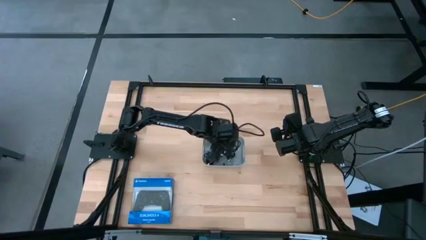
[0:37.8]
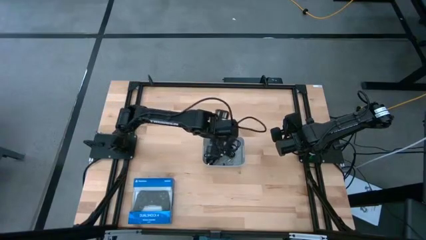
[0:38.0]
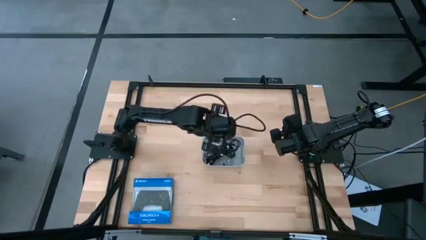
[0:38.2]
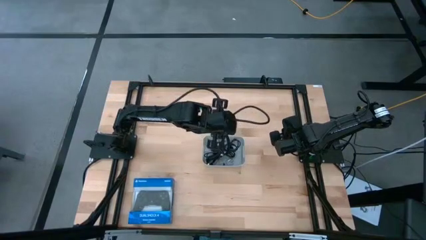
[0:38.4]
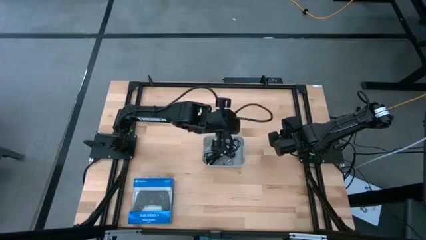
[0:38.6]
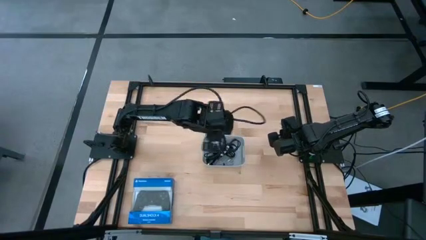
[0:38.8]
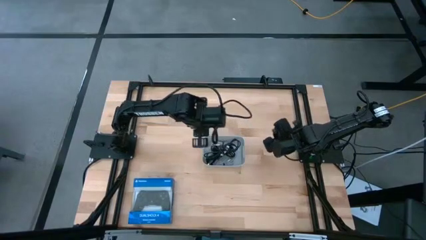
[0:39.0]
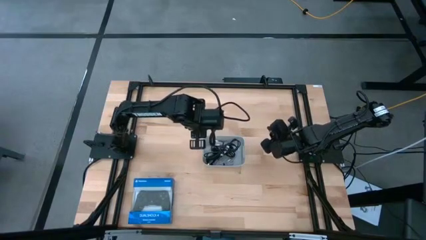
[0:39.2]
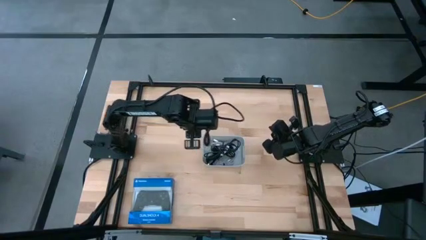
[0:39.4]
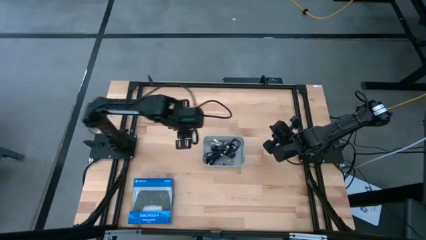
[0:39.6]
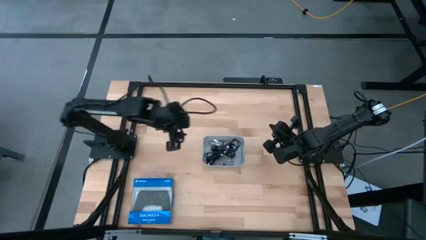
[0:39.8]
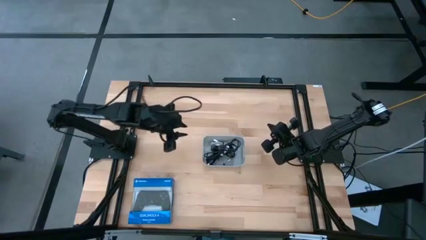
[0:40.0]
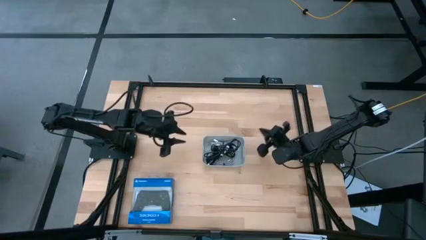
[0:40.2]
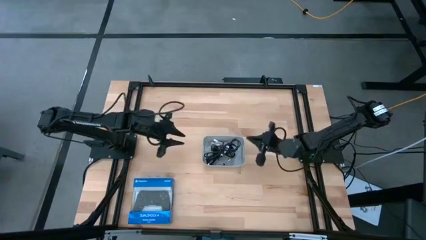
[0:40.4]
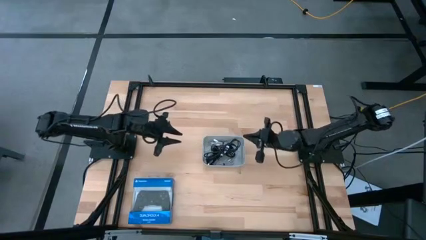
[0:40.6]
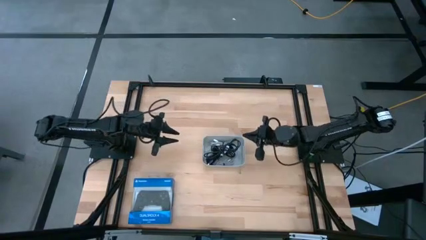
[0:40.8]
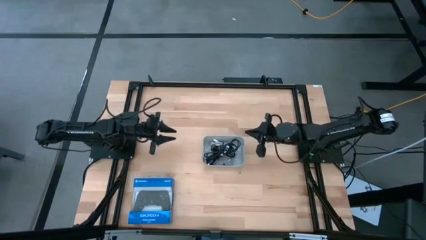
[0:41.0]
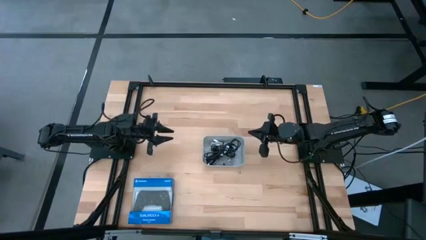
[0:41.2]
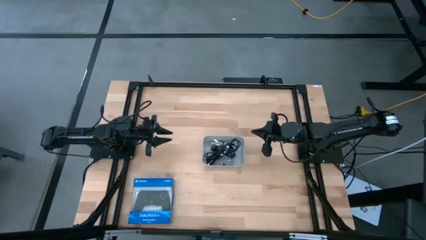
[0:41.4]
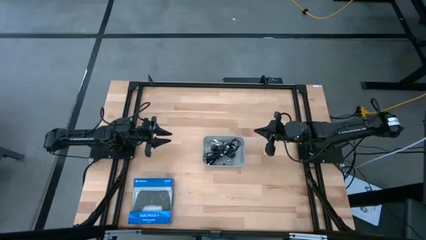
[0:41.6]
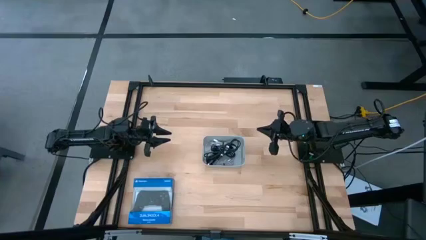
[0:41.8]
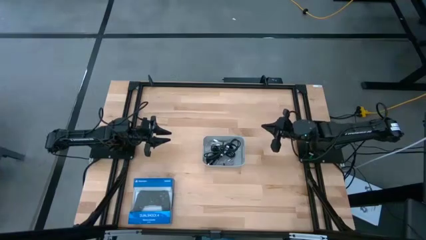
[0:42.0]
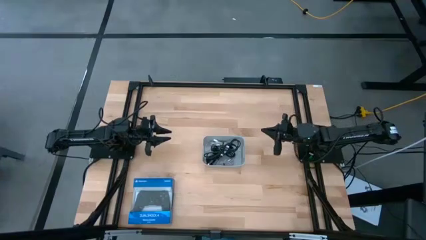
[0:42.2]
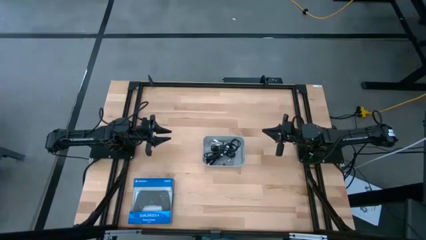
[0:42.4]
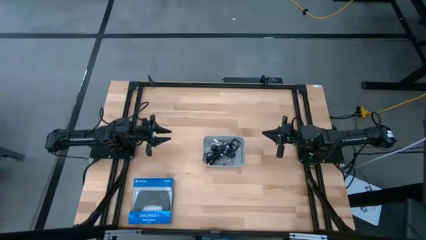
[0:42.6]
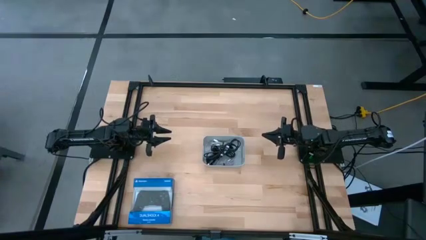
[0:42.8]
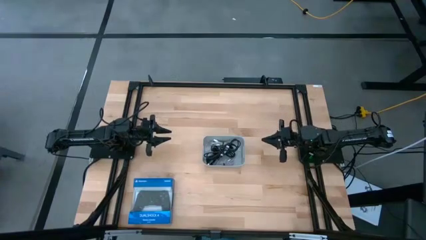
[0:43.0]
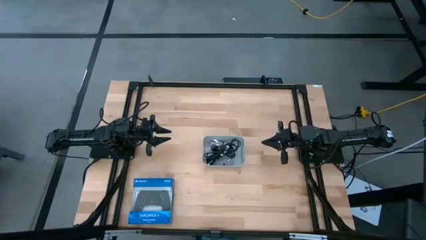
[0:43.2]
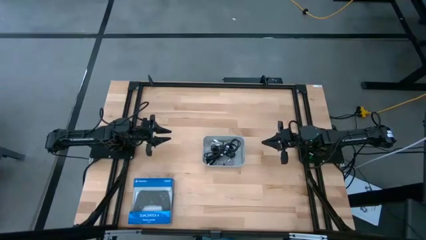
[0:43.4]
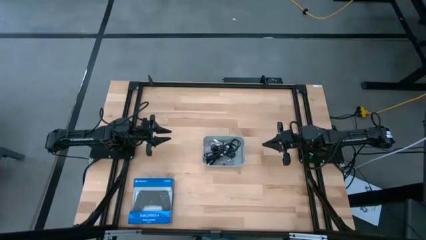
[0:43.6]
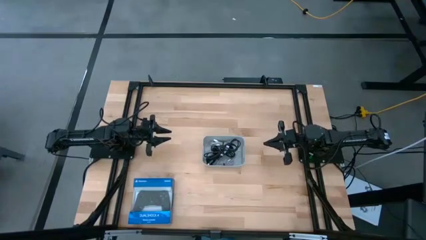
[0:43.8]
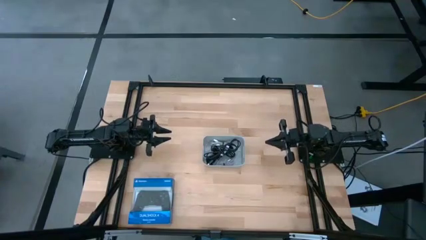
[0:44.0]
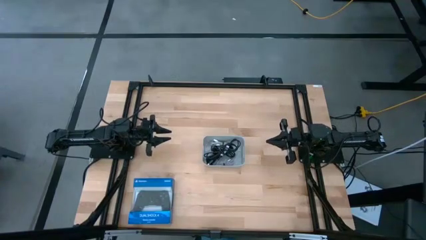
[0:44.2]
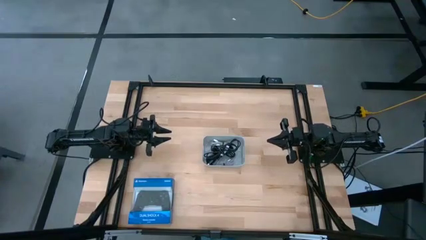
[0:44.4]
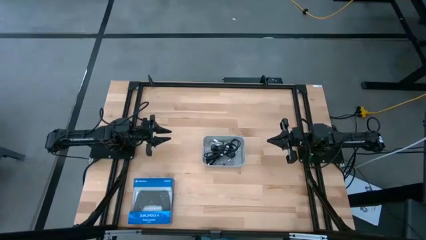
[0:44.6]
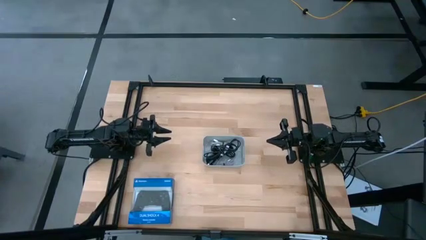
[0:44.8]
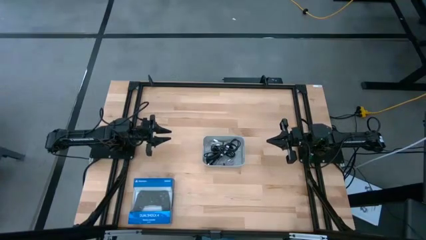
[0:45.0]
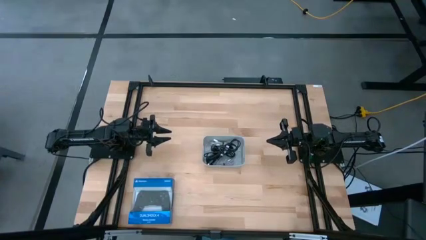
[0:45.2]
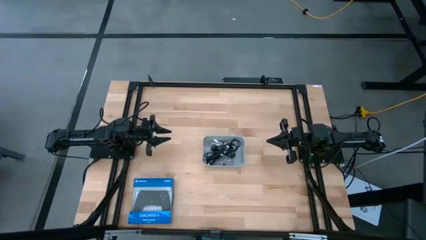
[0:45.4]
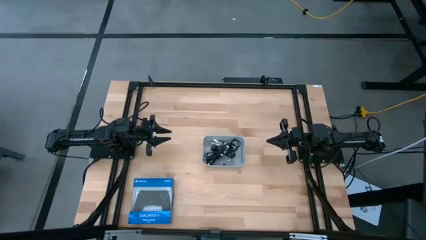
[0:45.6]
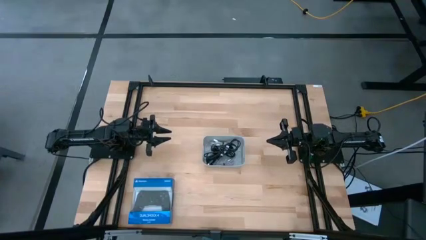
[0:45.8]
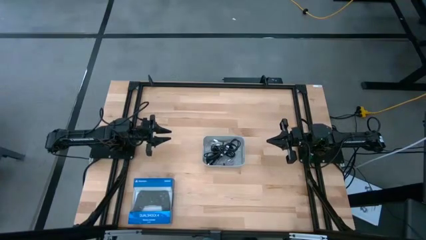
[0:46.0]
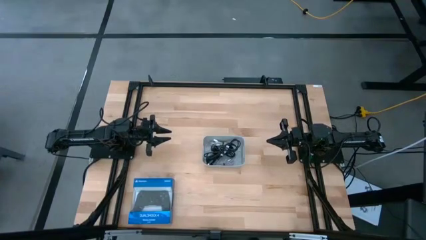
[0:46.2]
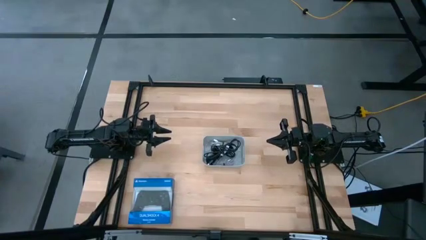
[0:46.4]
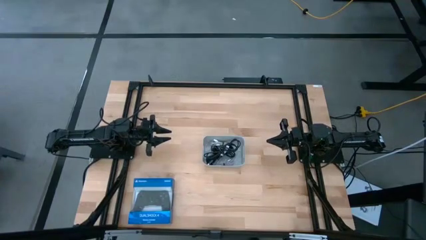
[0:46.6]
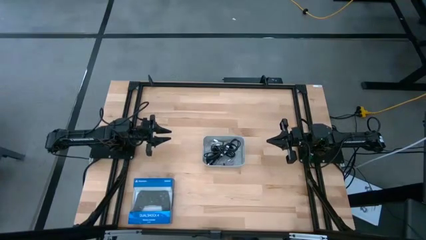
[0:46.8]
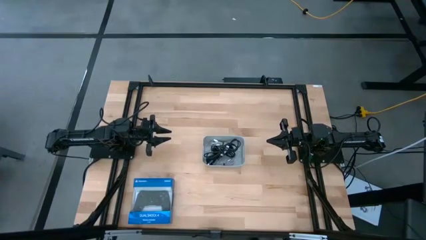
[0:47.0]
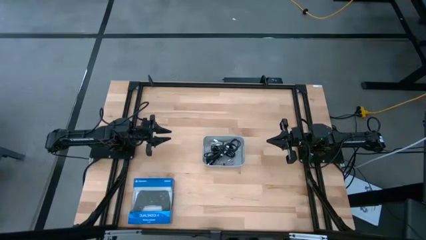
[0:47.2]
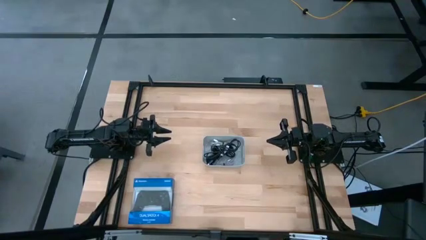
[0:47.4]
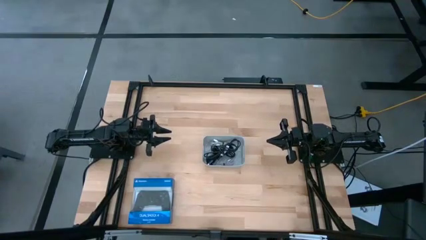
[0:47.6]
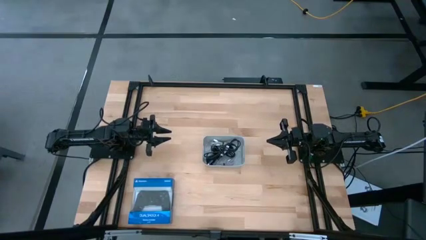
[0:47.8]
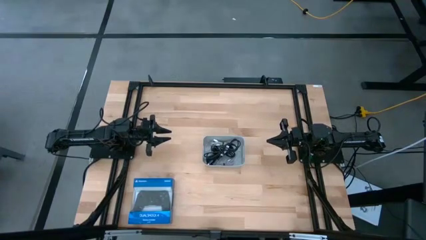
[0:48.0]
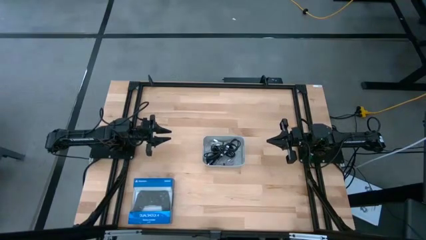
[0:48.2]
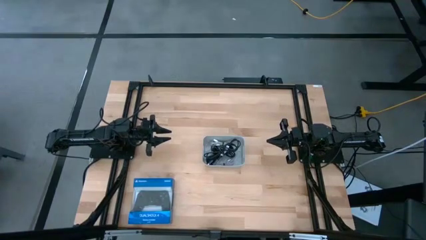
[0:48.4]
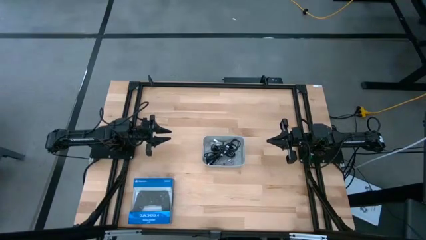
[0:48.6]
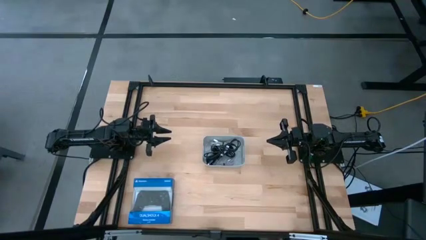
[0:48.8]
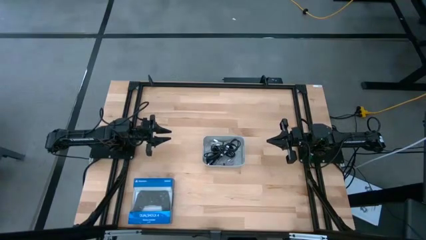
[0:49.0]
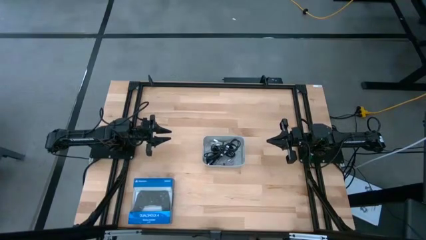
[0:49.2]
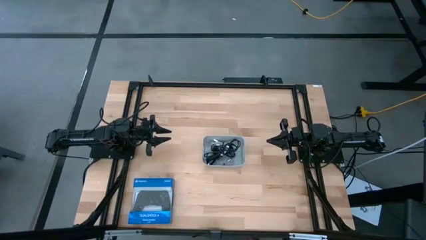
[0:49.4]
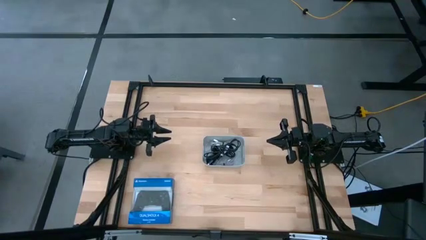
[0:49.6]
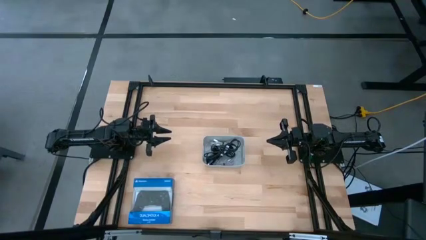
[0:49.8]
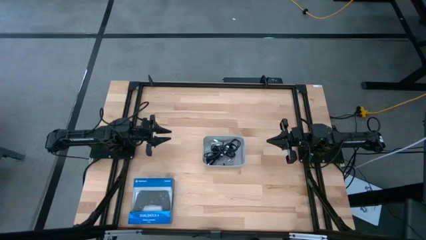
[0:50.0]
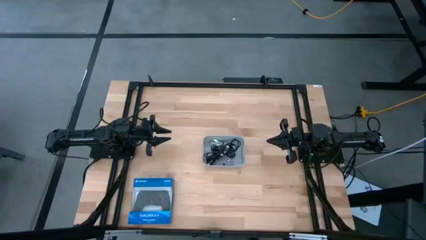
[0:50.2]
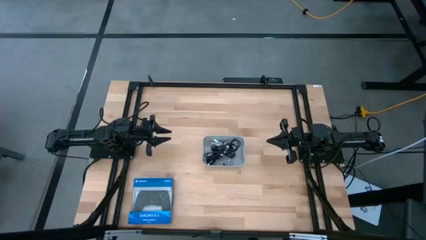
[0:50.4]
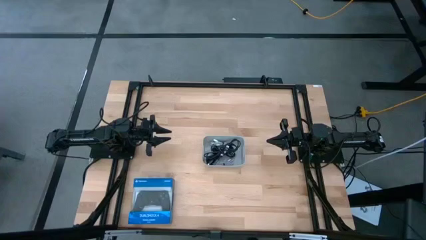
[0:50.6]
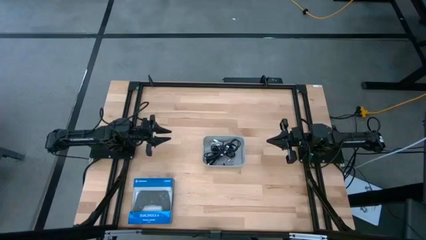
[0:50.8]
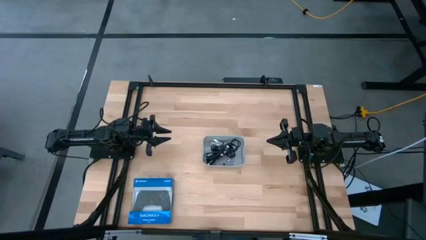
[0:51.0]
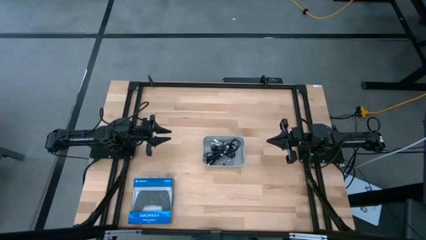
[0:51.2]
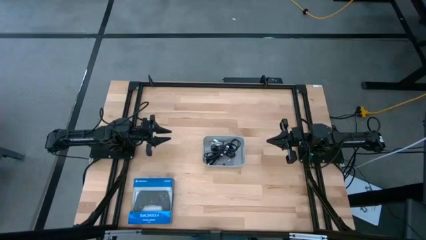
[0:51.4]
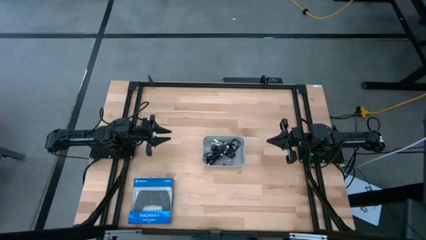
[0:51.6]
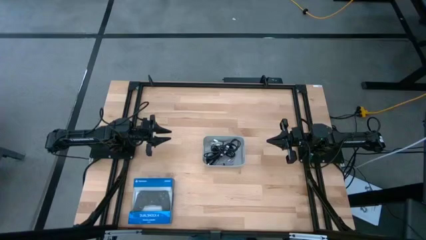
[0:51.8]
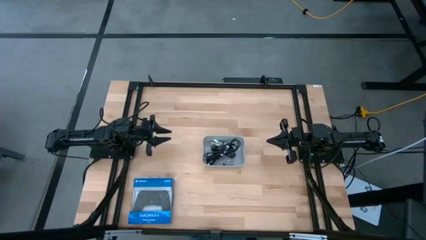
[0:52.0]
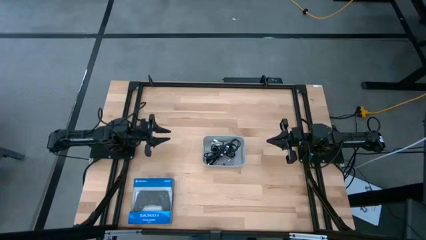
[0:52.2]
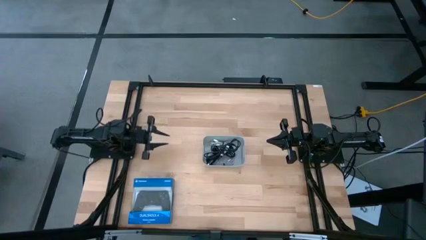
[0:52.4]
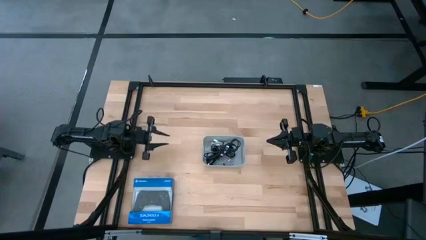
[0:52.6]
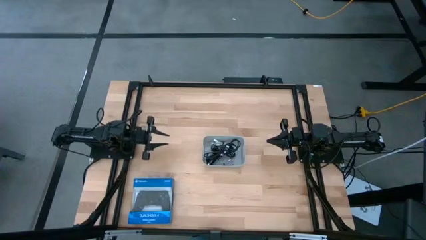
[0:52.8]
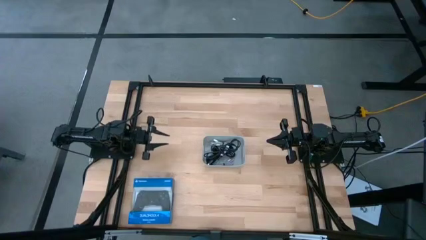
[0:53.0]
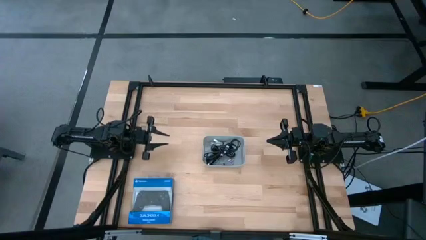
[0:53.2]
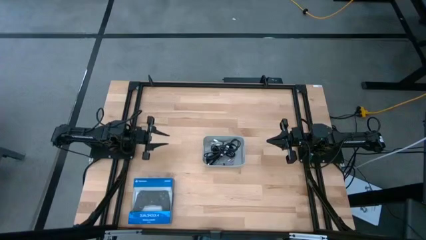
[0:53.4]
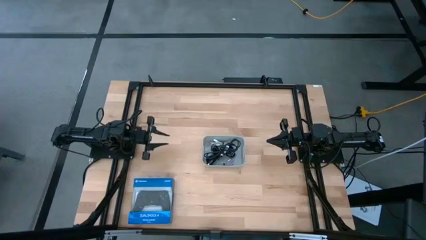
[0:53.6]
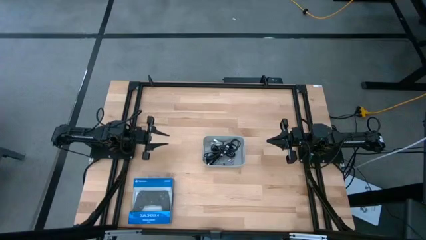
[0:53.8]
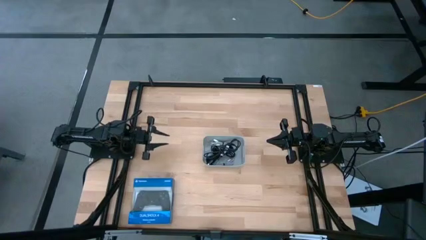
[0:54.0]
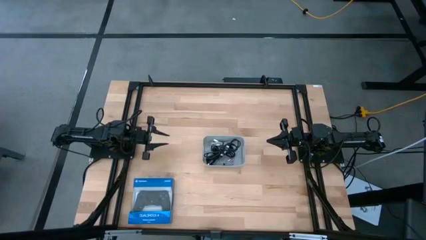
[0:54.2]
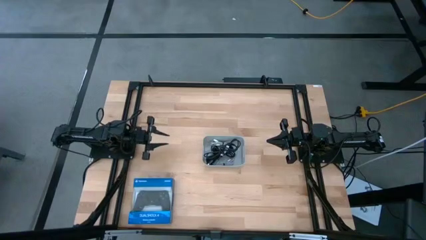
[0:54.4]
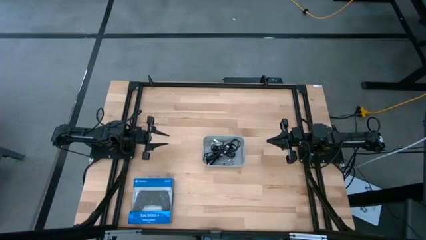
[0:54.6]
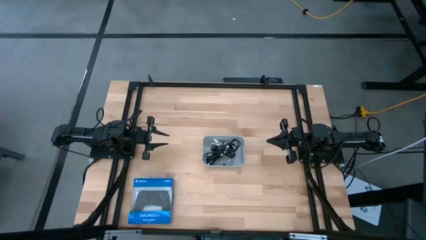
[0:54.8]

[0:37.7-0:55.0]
Task: Pick and place USB-C Cables
Return to Home Position
